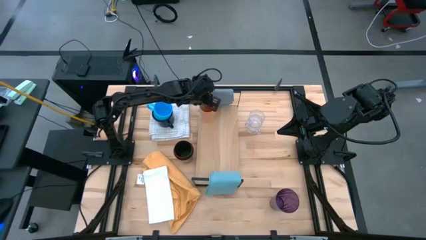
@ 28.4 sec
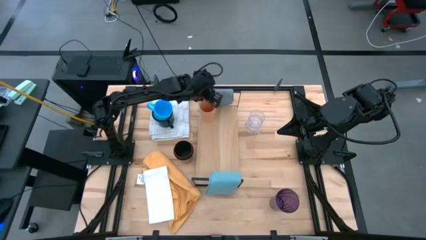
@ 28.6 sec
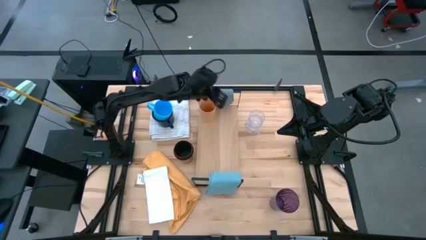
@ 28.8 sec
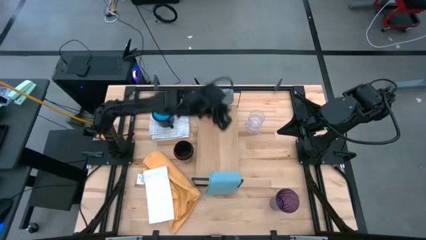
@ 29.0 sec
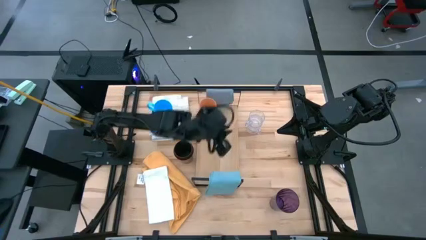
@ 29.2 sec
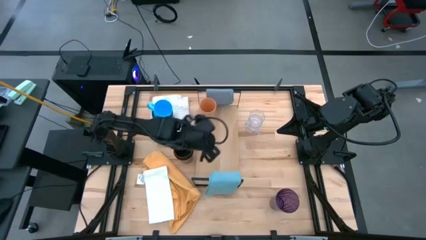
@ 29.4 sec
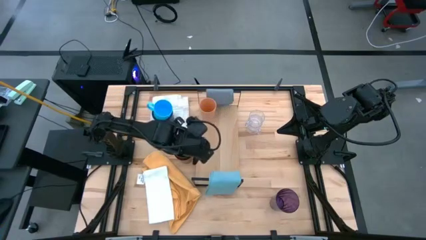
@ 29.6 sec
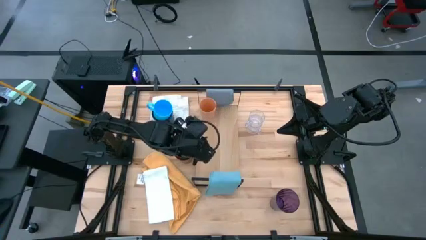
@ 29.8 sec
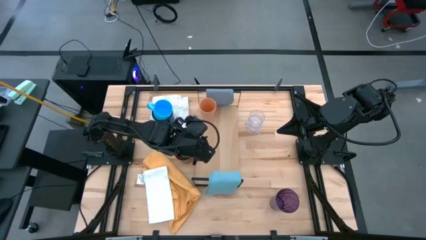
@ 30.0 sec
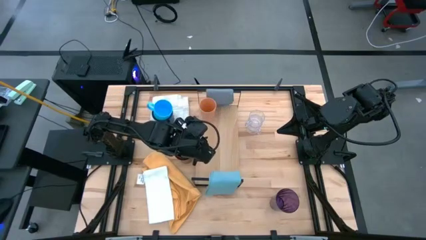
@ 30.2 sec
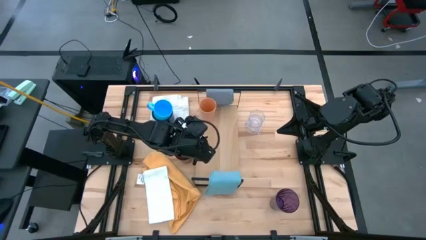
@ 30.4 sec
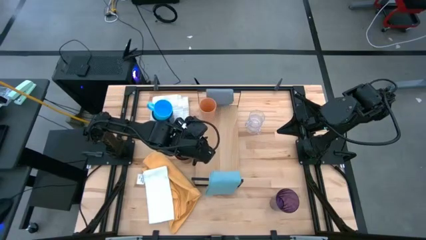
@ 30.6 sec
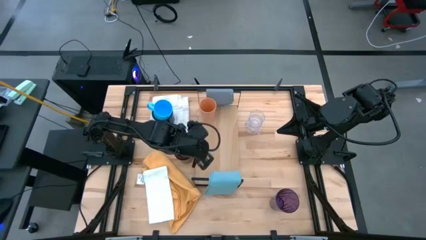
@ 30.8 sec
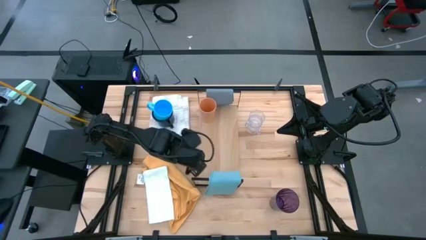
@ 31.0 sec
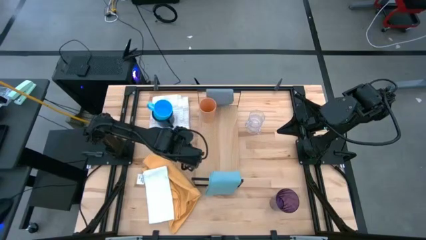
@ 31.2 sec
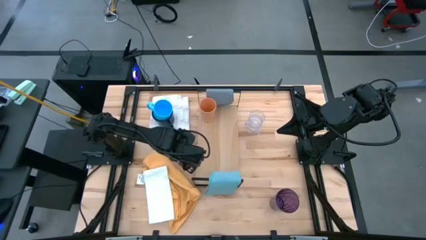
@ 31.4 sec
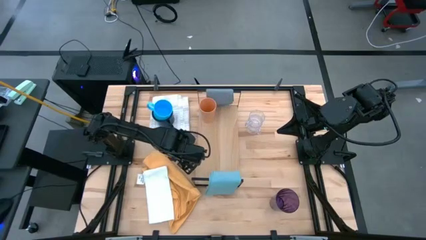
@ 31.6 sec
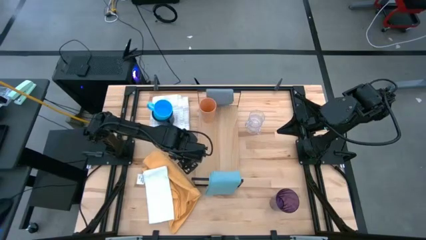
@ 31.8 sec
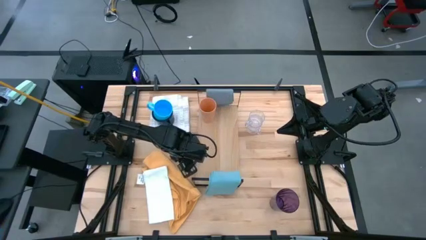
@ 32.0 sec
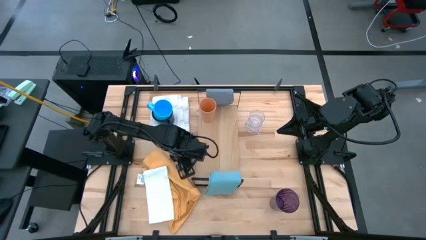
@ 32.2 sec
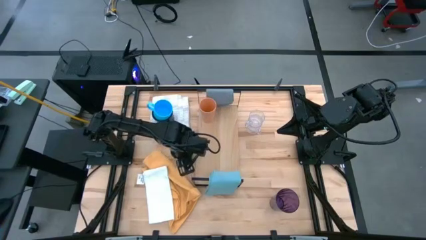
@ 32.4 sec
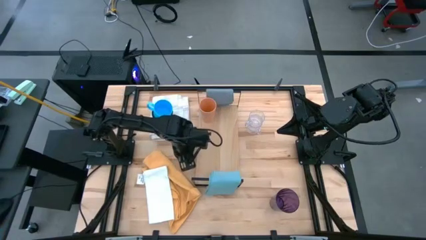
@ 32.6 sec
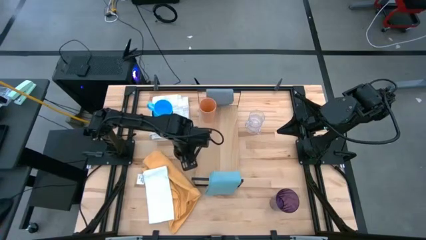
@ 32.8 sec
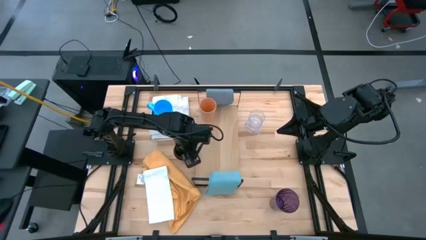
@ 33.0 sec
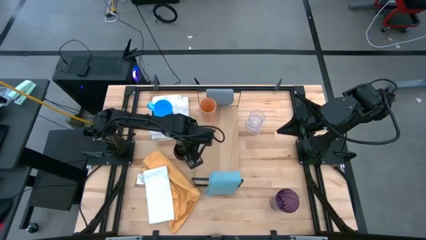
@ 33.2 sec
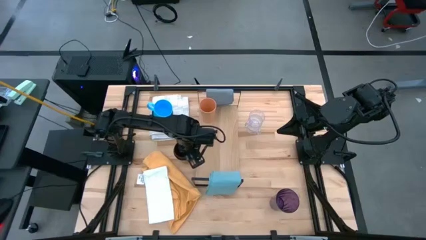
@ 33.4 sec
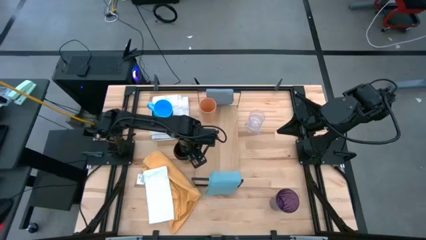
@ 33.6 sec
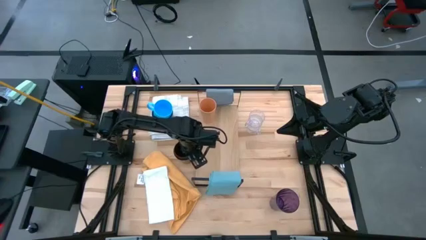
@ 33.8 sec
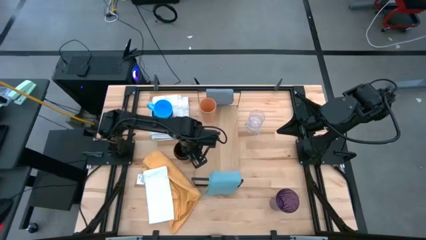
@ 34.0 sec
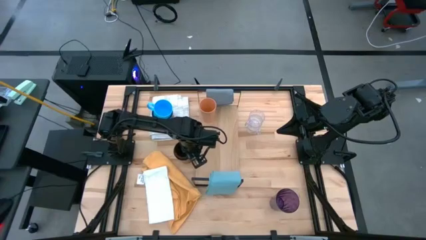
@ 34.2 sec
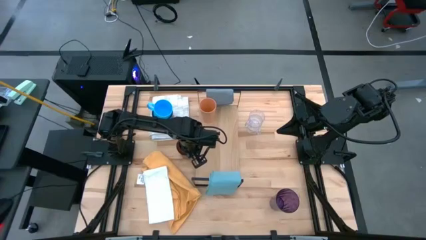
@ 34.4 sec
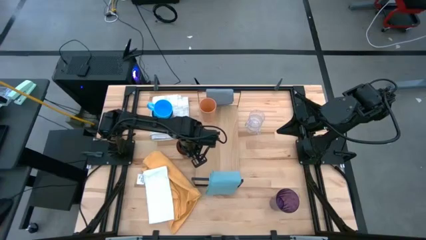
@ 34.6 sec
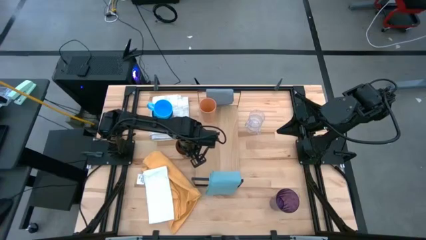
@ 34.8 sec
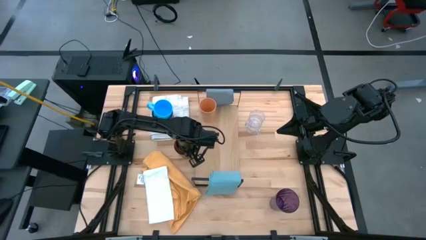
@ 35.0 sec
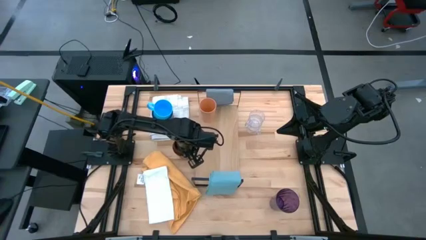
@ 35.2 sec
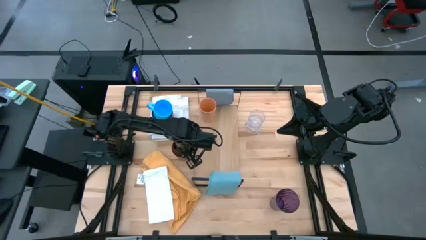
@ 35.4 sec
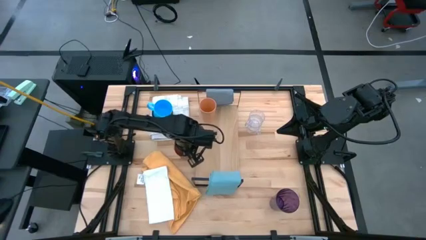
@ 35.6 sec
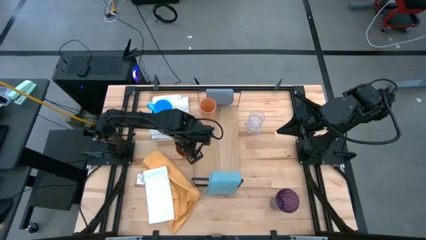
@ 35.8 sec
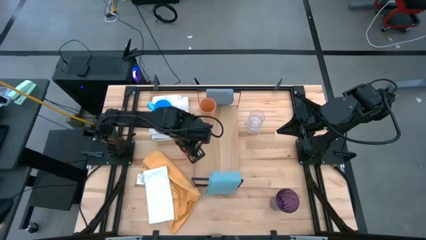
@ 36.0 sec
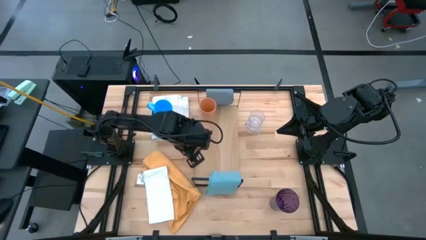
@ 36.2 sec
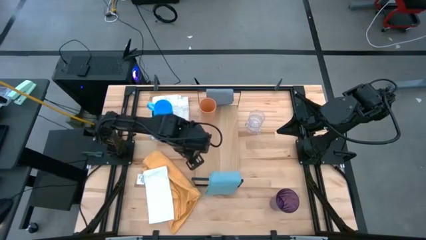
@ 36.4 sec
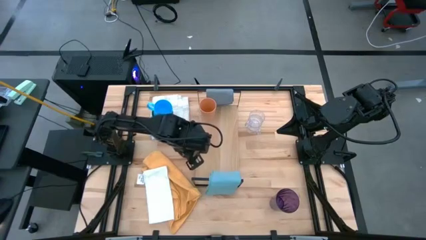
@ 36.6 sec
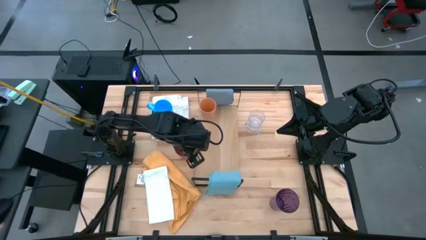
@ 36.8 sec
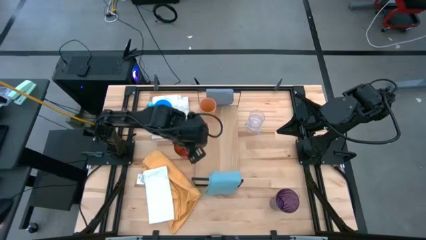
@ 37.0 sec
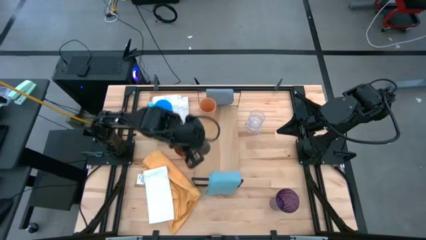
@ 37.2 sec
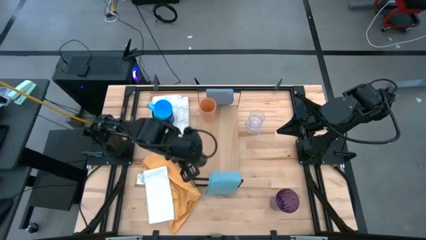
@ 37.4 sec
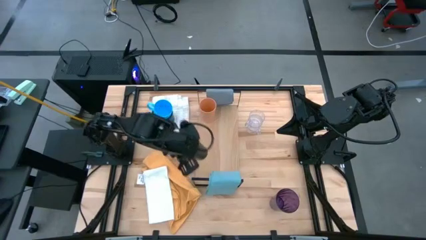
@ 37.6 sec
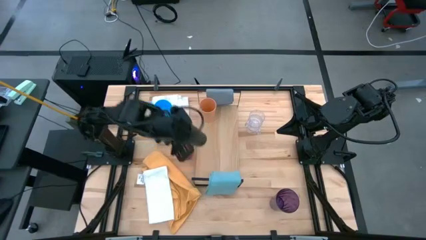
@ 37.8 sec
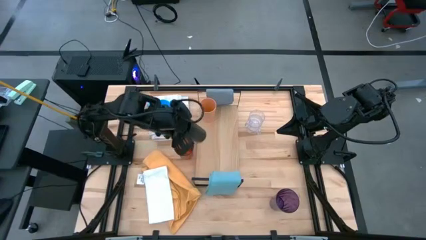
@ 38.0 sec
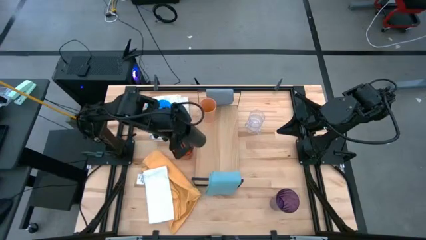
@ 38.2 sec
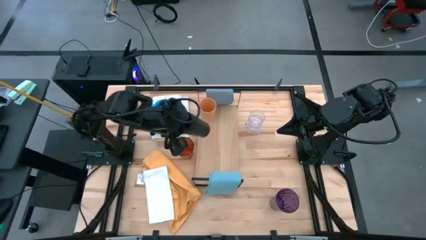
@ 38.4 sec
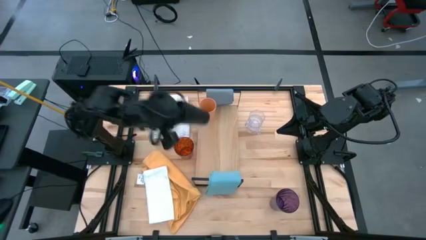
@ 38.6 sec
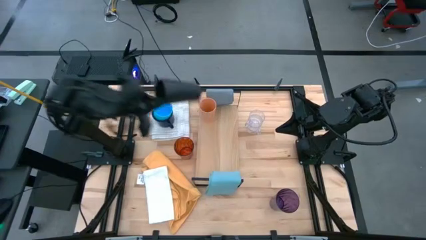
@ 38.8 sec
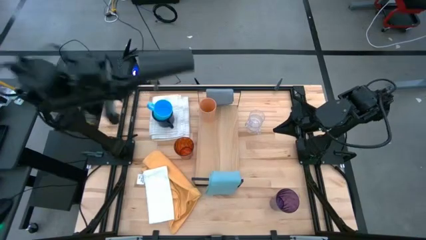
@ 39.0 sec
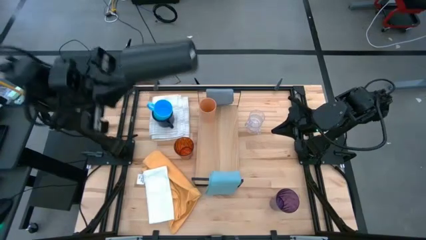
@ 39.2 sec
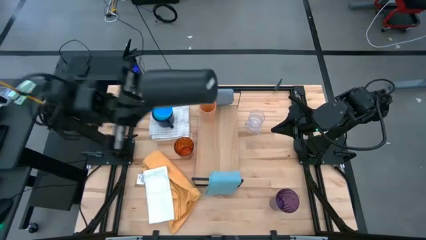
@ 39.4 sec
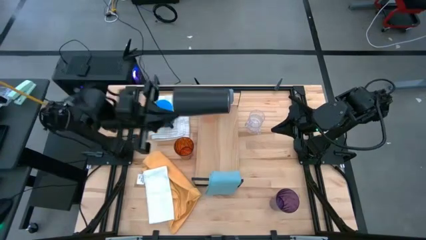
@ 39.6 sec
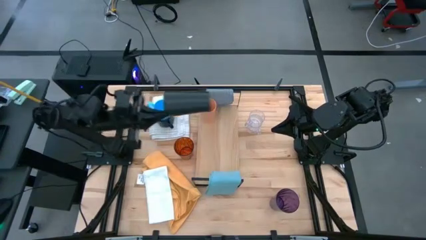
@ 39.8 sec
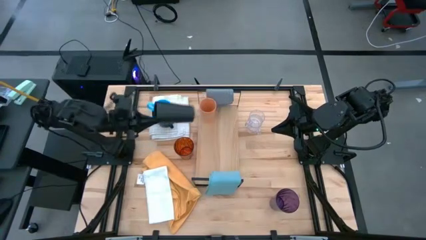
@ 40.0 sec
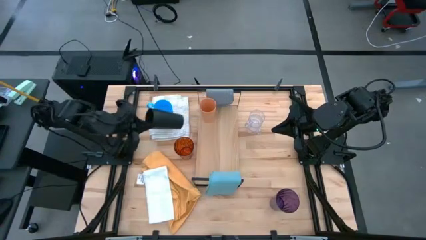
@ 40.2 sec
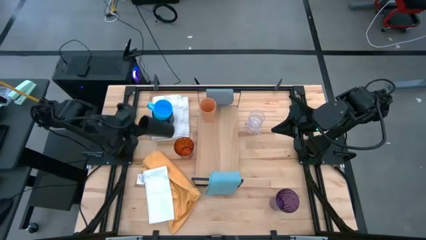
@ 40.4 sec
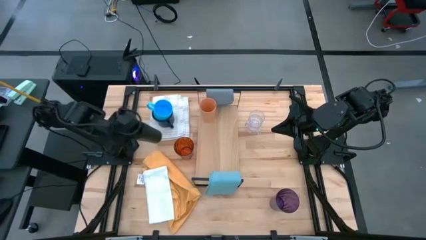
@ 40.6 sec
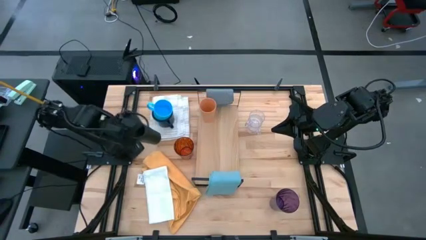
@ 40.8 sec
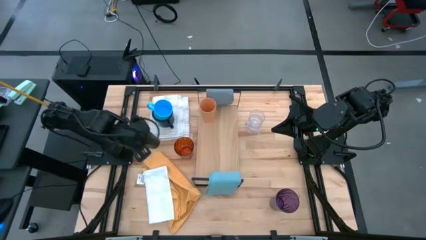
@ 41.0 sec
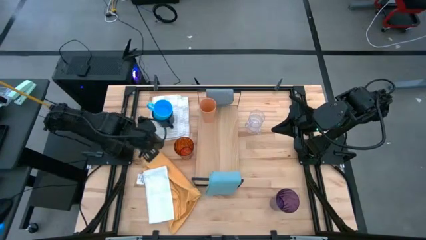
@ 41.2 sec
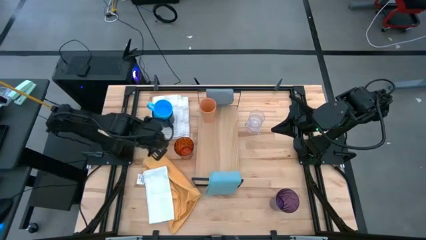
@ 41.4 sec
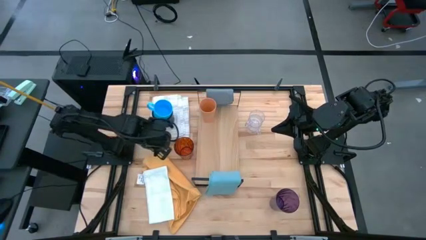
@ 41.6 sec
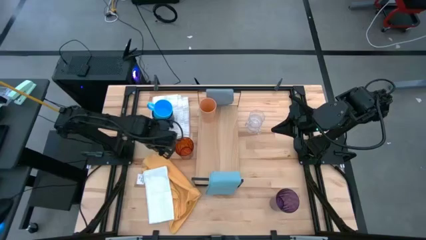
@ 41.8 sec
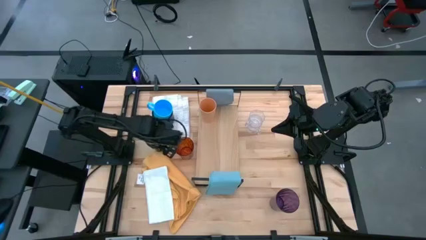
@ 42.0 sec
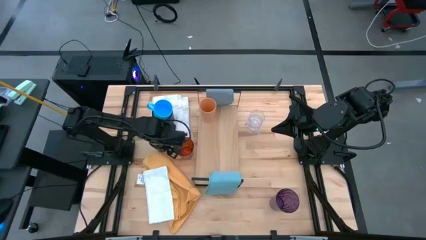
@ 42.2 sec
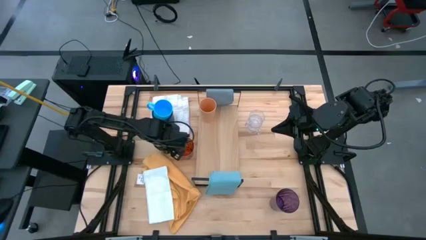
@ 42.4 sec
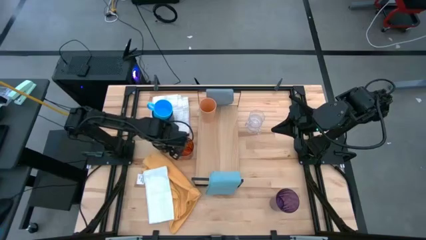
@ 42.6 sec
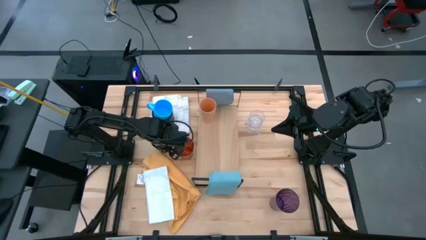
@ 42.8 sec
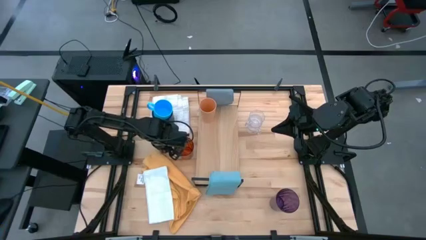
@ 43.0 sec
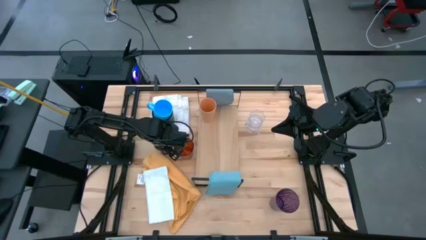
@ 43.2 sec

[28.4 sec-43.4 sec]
Task: Stack small to large cups/mugs on shelf
Remove the black cup from the top of the orange cup
